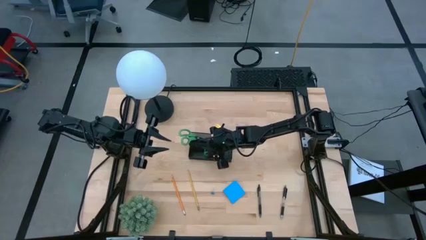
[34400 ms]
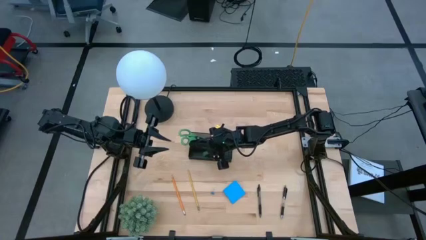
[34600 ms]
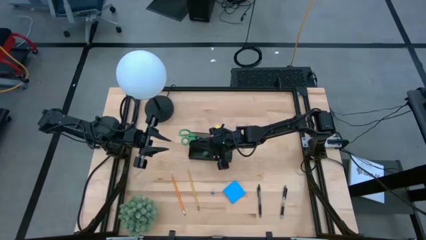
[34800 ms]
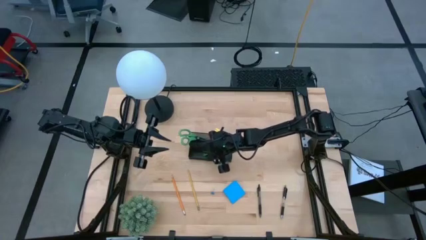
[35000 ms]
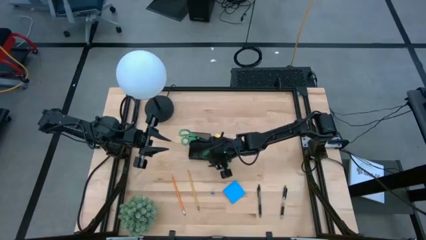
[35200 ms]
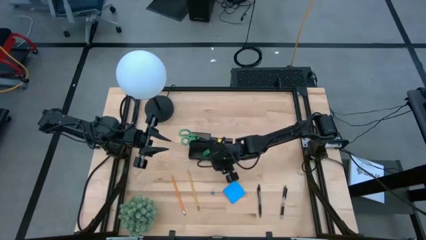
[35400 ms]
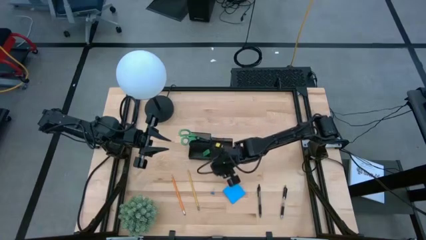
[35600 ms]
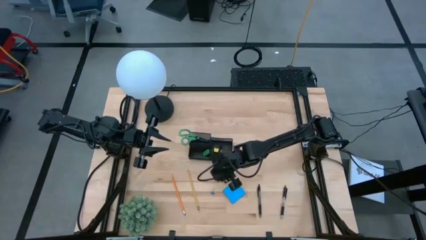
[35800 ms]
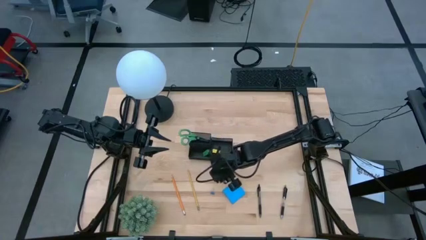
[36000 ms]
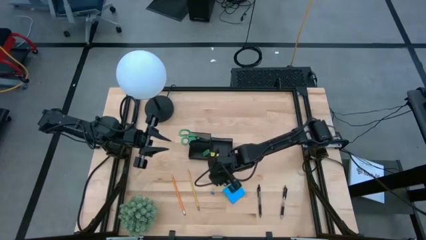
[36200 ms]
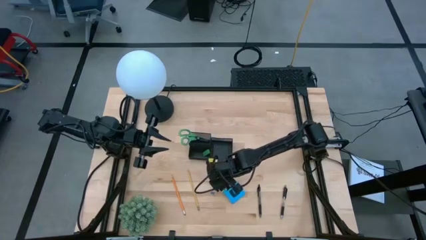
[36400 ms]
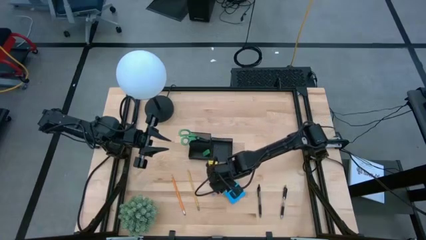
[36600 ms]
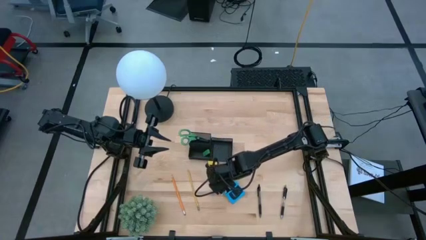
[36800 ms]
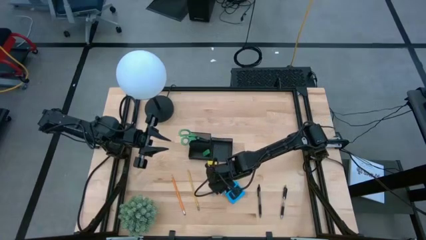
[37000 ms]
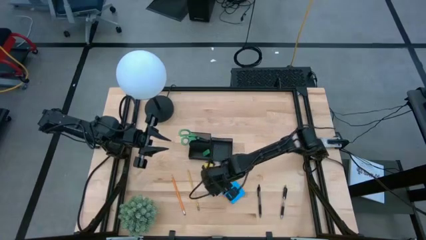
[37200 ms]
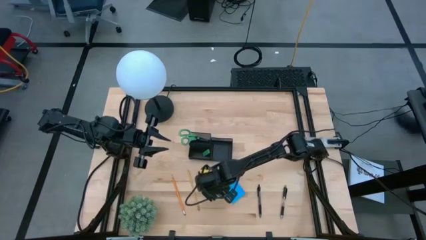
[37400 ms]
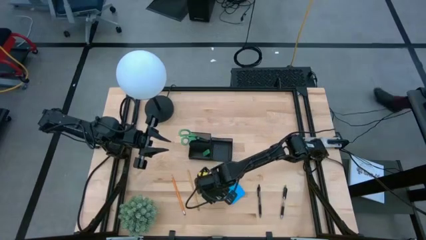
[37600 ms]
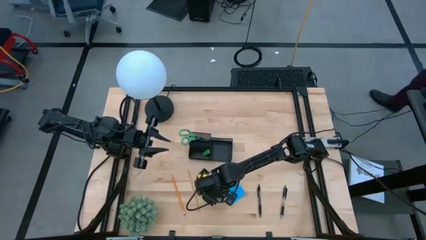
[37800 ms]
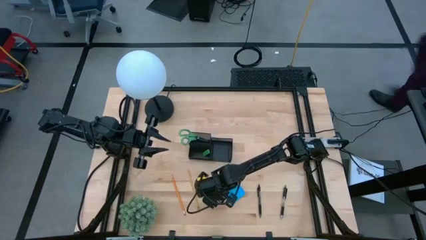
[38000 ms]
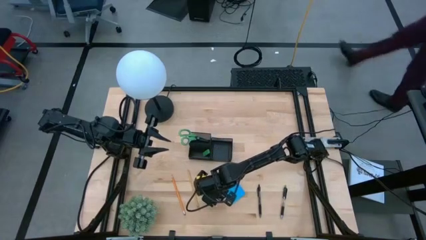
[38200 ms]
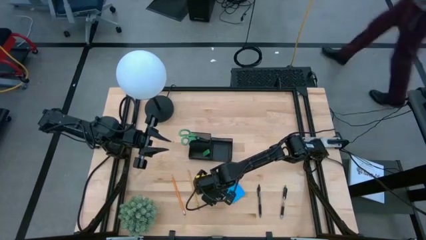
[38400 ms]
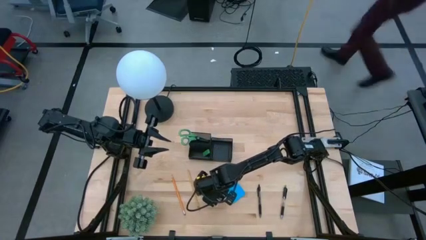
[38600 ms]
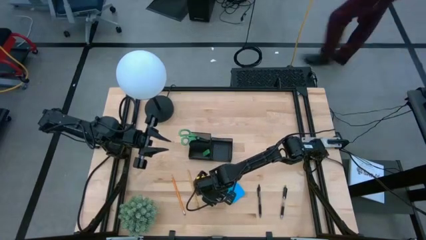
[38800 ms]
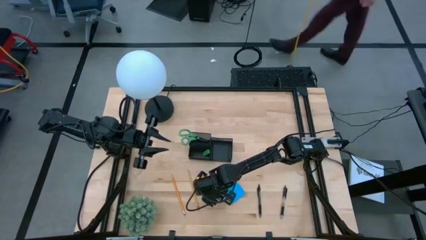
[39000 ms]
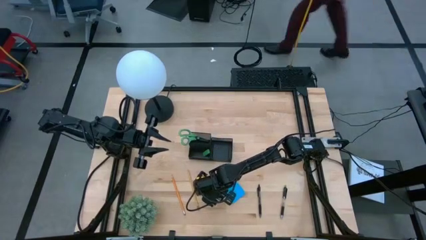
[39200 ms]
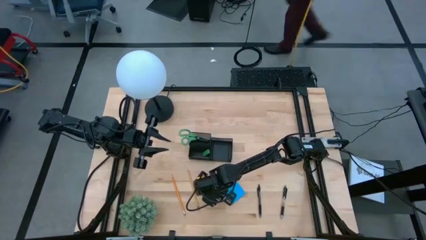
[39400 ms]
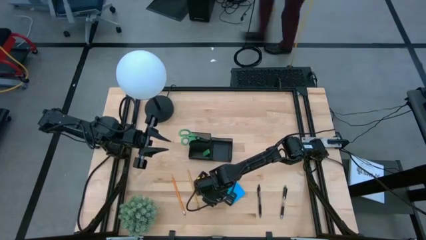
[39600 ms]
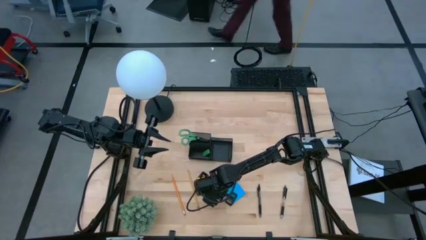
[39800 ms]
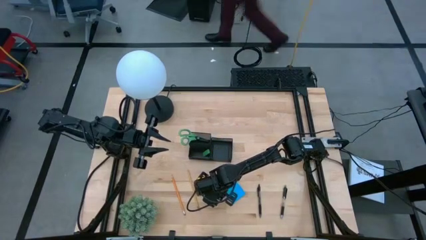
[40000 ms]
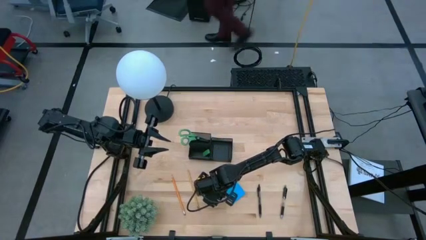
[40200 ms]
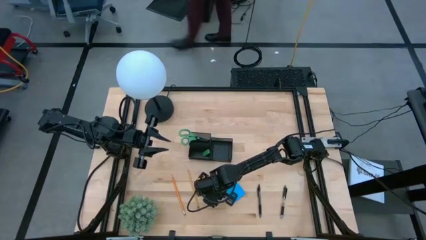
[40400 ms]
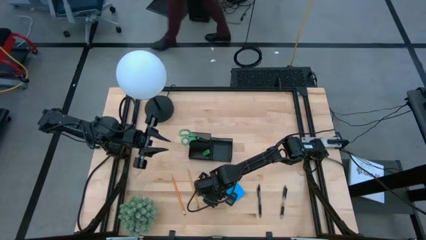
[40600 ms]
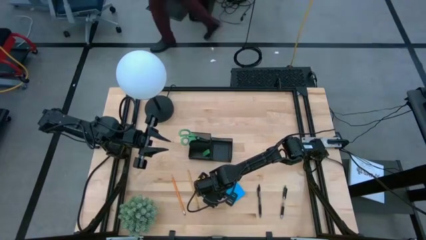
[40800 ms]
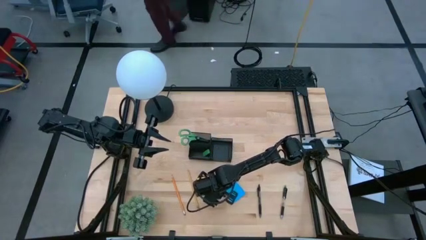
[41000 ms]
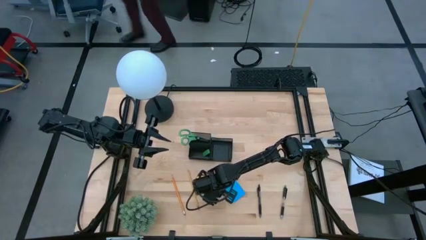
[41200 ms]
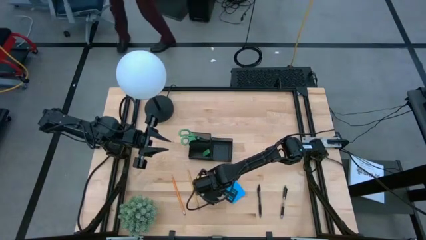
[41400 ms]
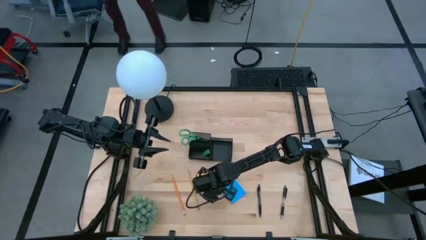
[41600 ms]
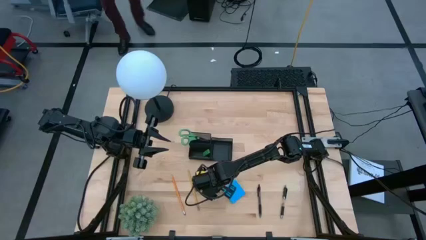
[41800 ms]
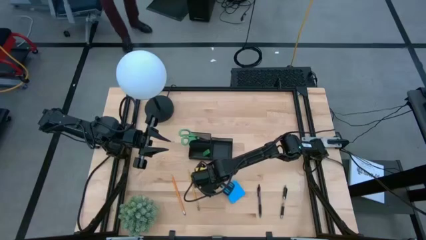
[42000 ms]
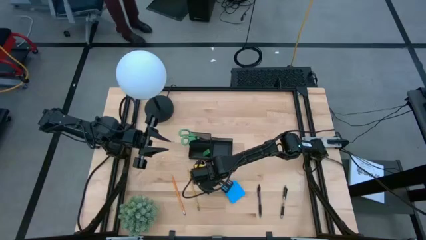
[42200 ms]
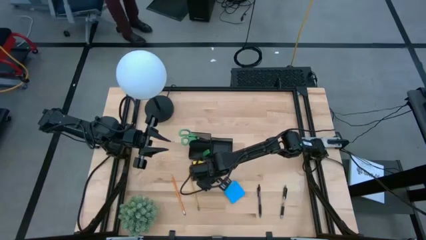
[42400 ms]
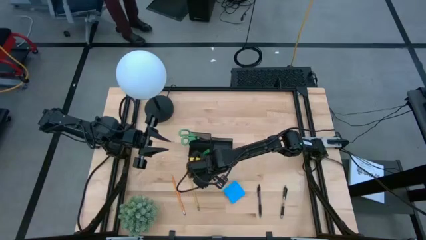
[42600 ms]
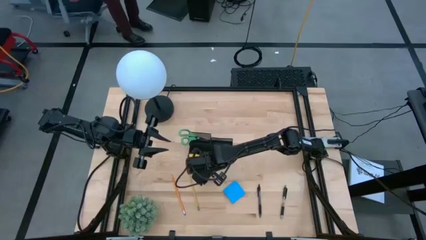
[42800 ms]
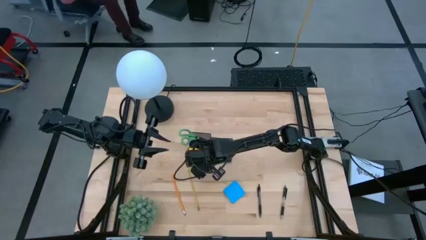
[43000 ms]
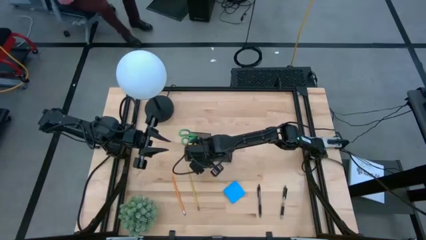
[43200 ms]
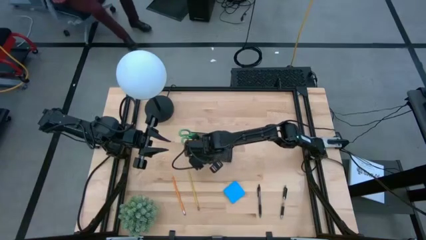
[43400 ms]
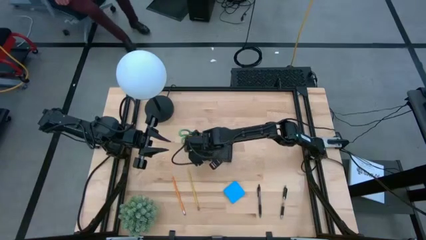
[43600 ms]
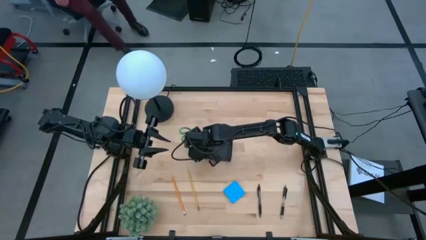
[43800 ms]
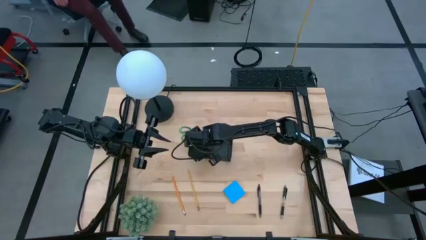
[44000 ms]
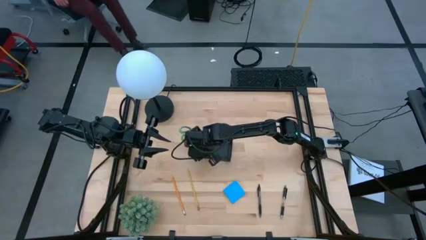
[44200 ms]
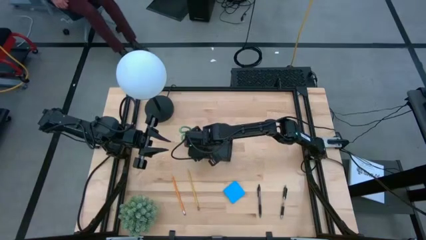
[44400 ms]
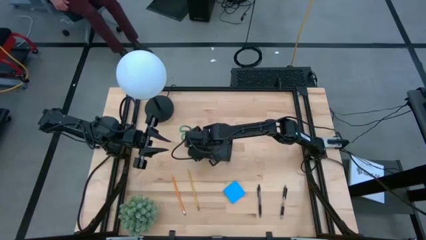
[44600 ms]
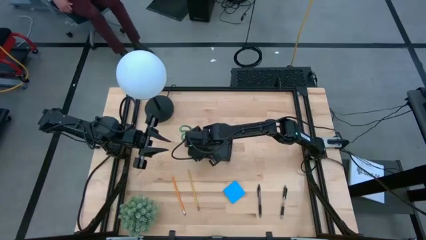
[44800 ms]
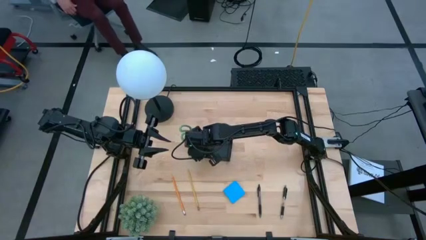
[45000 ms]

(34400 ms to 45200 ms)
Task: Pick and place office supplies into organizer
Put the blue binder clip into the black desk organizer
